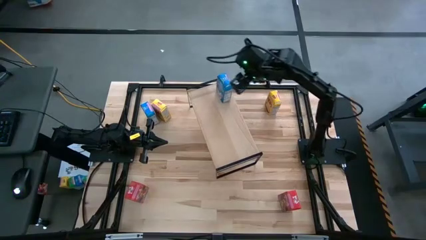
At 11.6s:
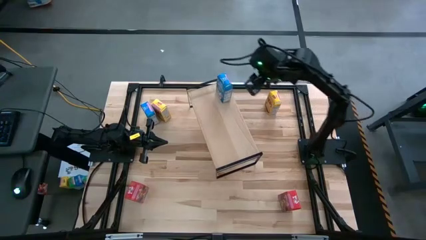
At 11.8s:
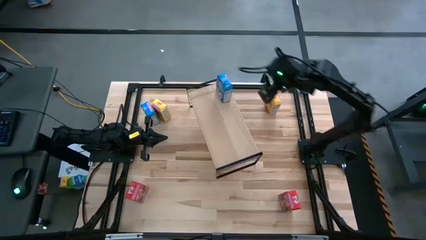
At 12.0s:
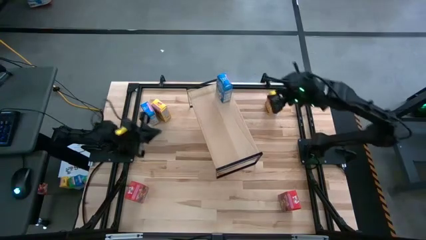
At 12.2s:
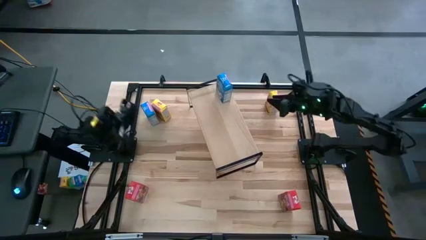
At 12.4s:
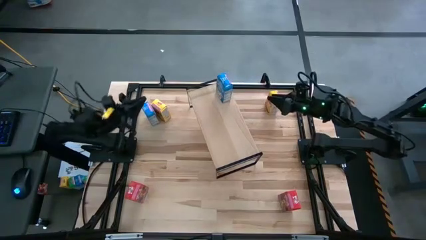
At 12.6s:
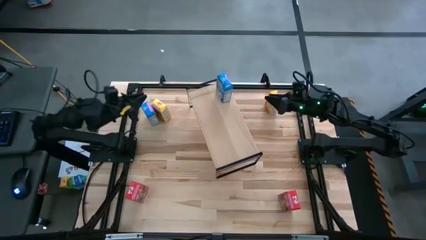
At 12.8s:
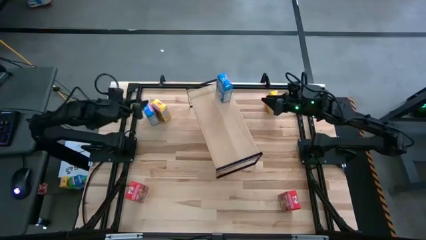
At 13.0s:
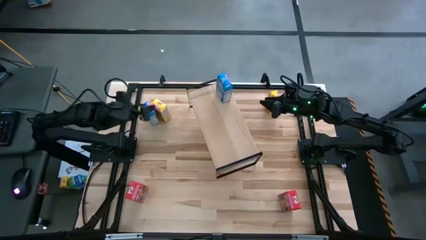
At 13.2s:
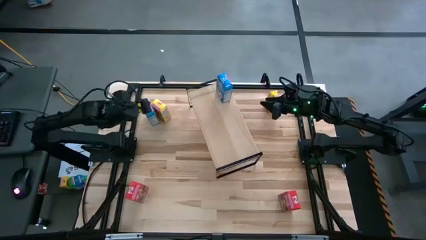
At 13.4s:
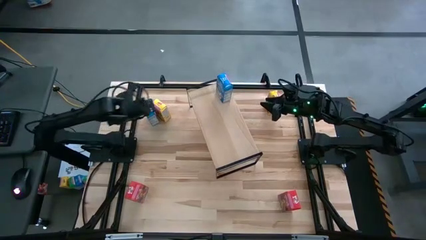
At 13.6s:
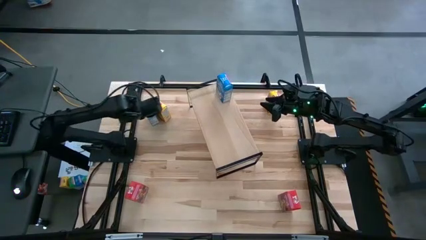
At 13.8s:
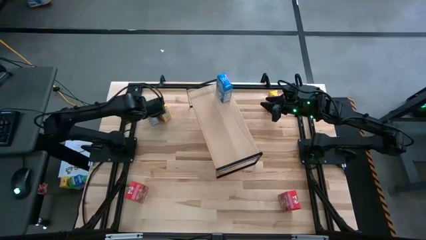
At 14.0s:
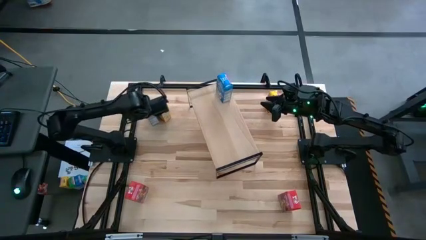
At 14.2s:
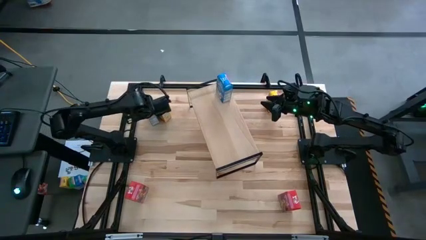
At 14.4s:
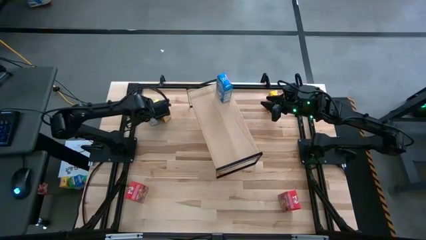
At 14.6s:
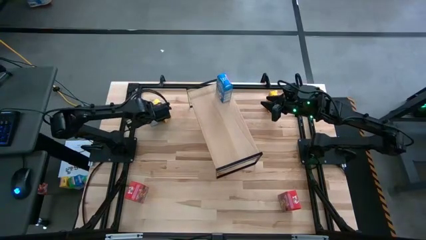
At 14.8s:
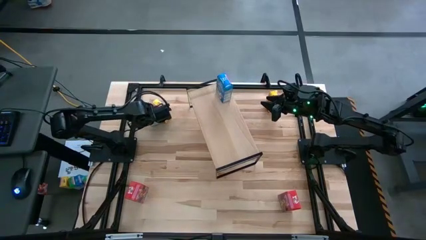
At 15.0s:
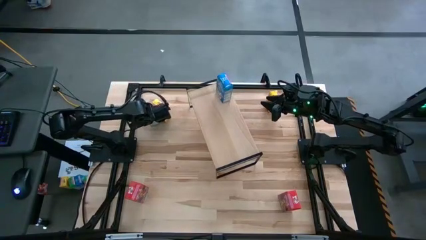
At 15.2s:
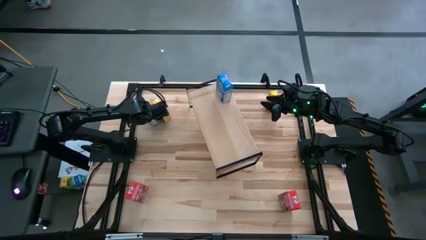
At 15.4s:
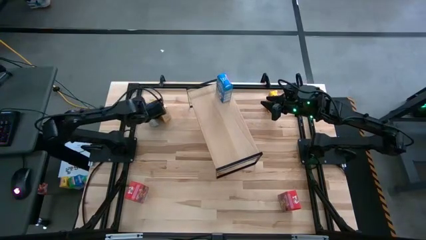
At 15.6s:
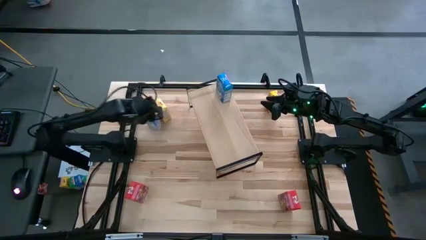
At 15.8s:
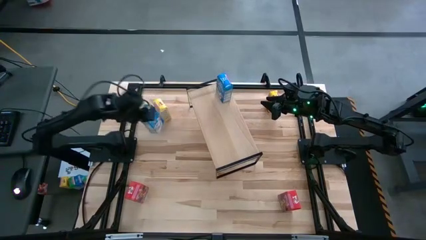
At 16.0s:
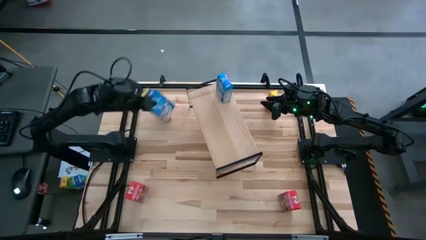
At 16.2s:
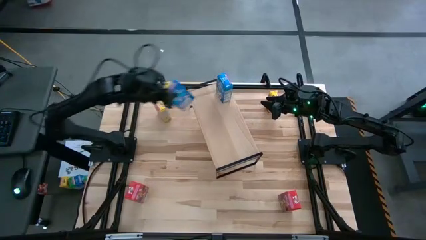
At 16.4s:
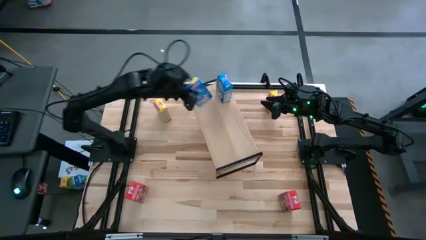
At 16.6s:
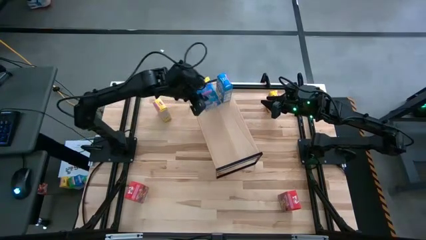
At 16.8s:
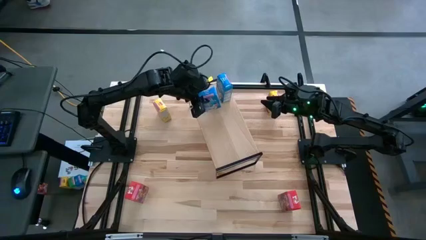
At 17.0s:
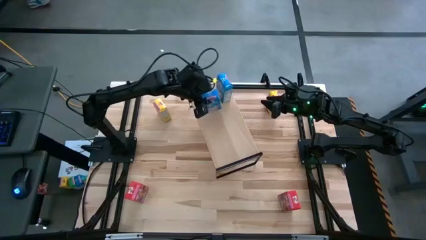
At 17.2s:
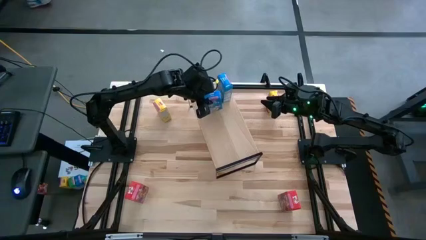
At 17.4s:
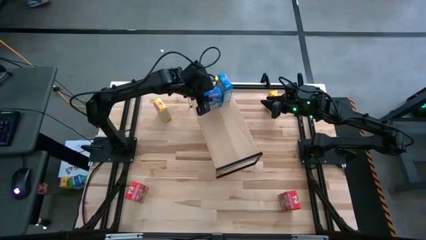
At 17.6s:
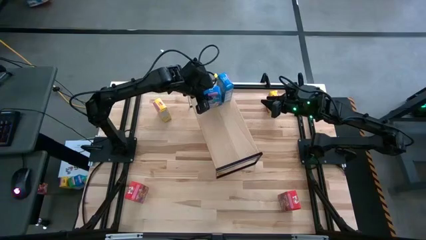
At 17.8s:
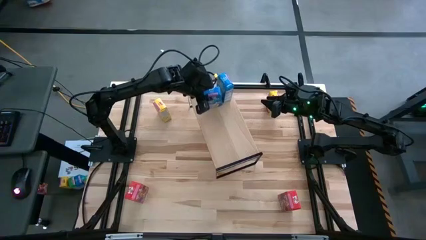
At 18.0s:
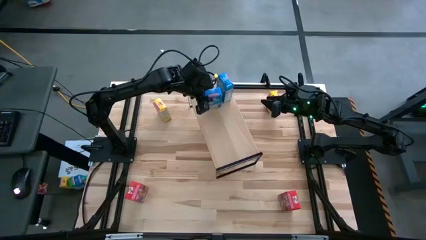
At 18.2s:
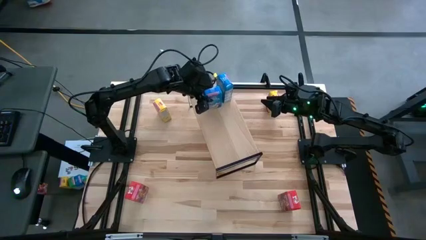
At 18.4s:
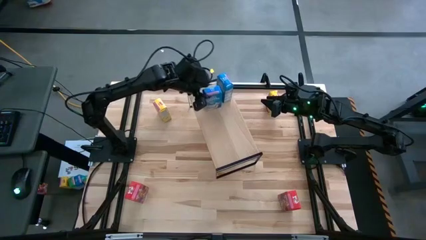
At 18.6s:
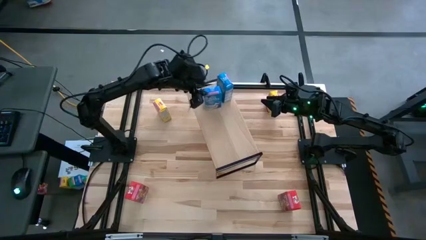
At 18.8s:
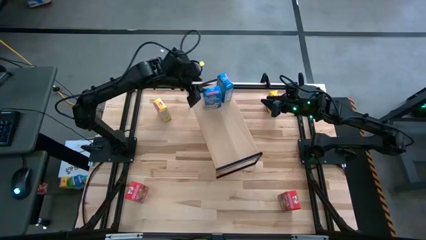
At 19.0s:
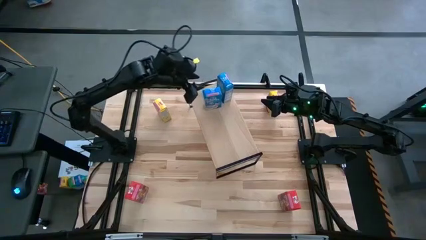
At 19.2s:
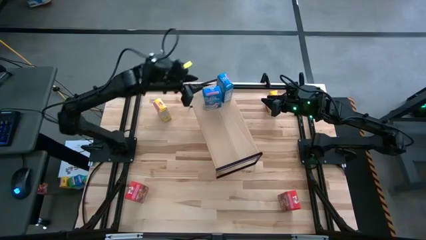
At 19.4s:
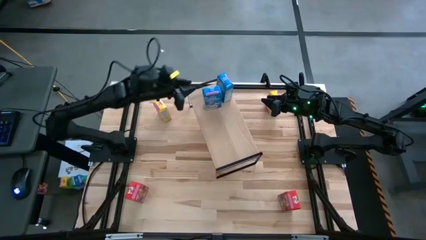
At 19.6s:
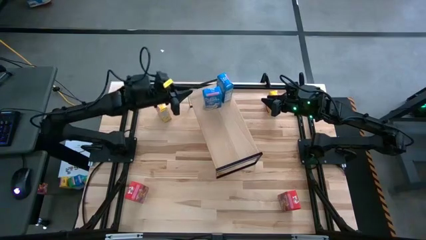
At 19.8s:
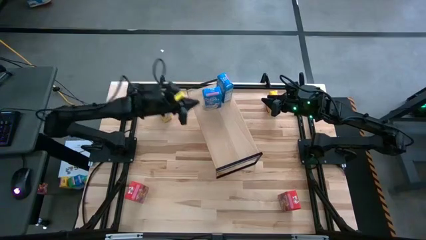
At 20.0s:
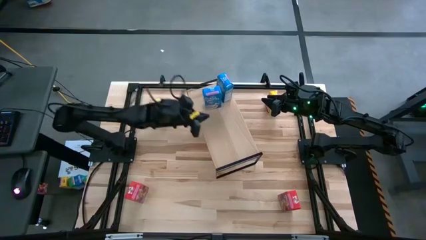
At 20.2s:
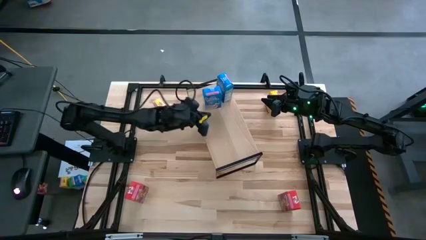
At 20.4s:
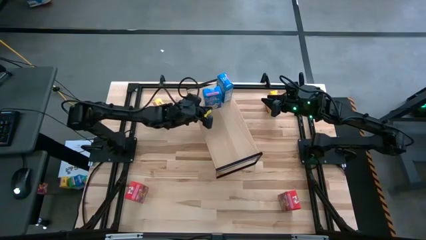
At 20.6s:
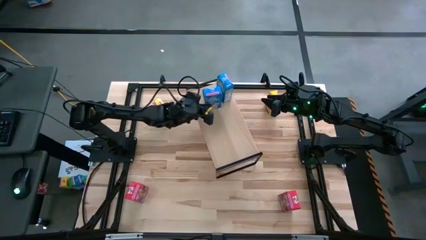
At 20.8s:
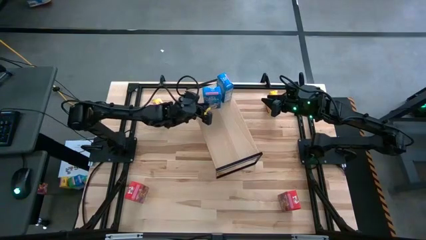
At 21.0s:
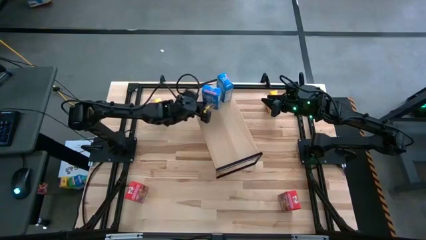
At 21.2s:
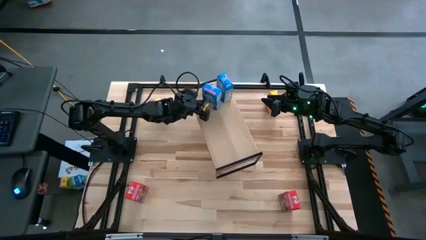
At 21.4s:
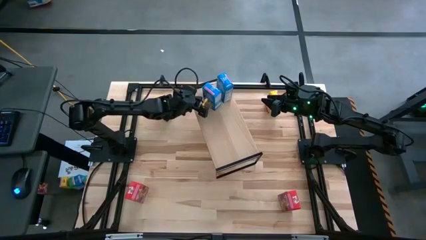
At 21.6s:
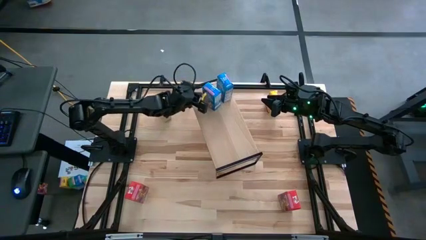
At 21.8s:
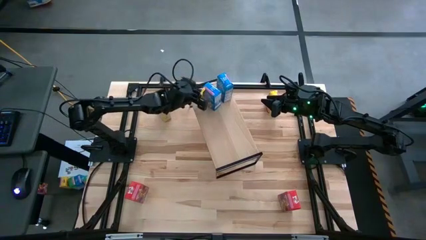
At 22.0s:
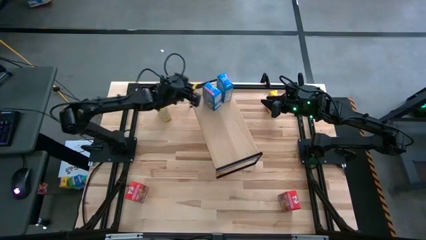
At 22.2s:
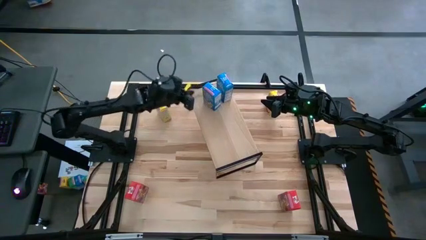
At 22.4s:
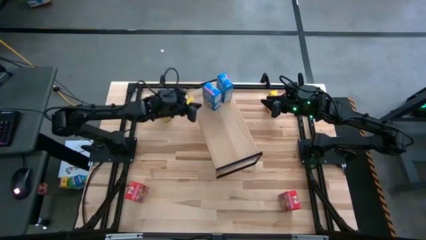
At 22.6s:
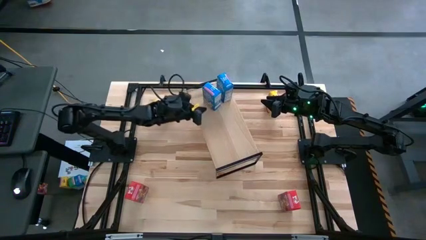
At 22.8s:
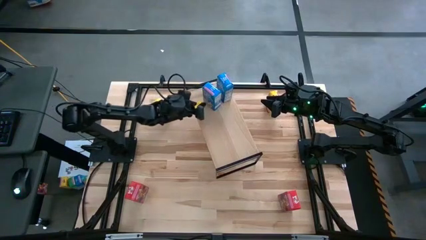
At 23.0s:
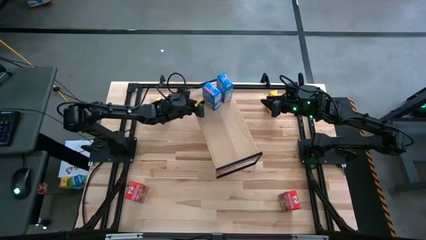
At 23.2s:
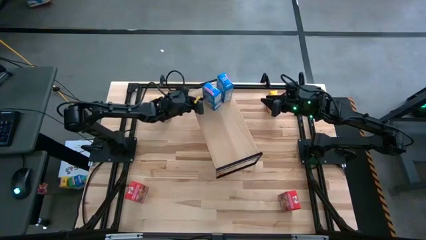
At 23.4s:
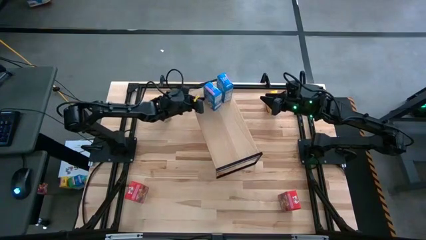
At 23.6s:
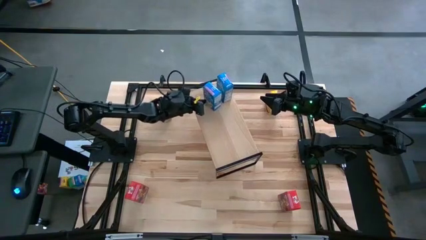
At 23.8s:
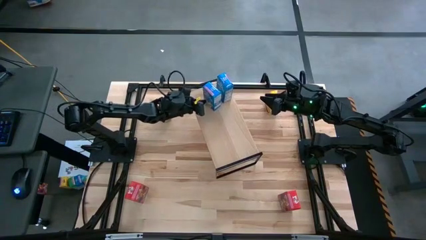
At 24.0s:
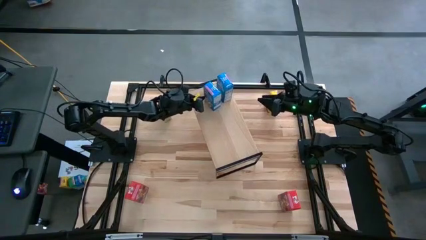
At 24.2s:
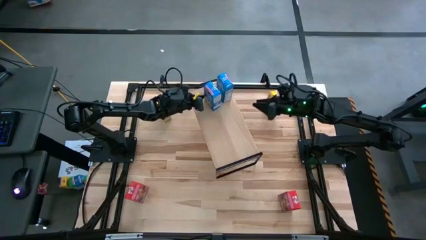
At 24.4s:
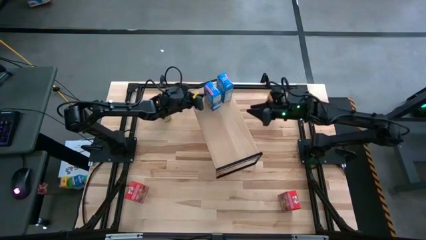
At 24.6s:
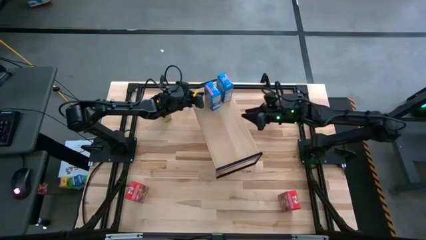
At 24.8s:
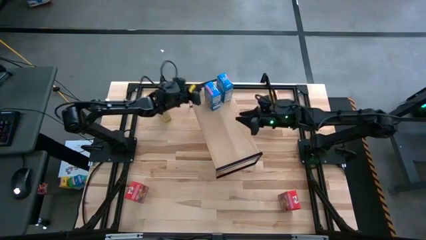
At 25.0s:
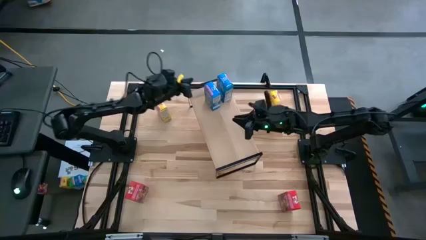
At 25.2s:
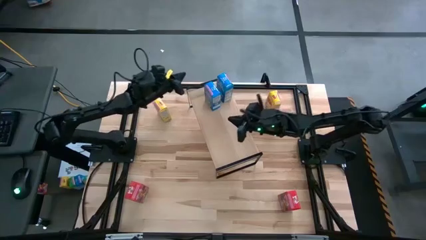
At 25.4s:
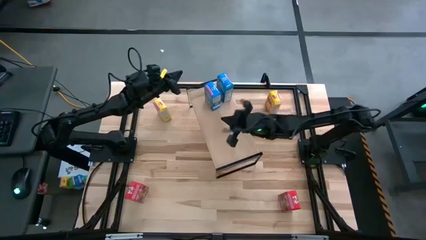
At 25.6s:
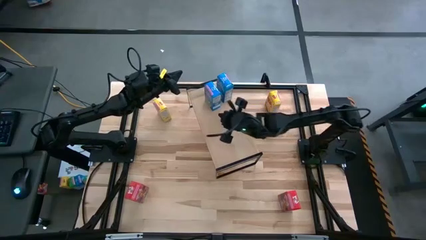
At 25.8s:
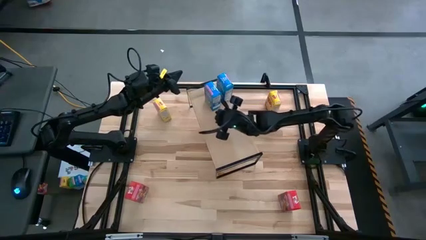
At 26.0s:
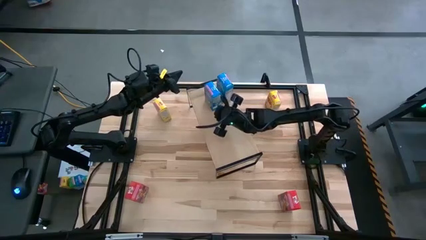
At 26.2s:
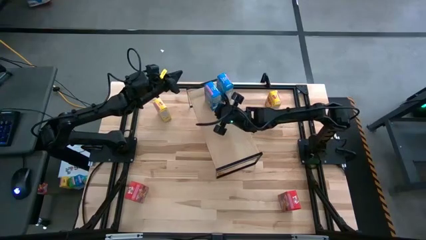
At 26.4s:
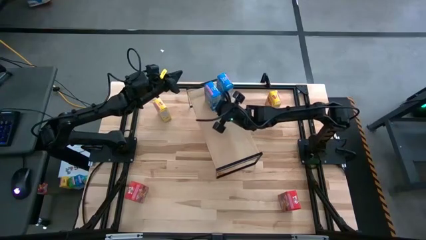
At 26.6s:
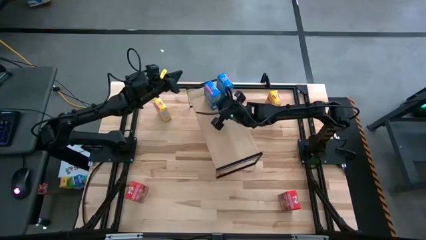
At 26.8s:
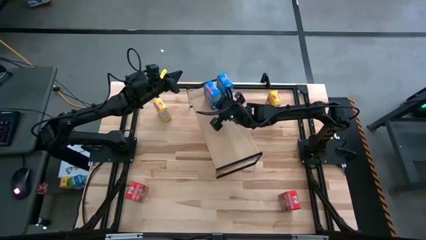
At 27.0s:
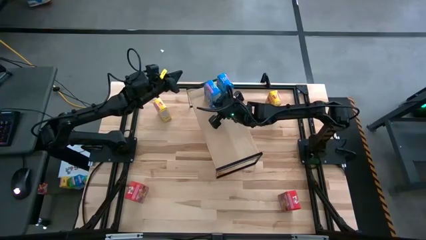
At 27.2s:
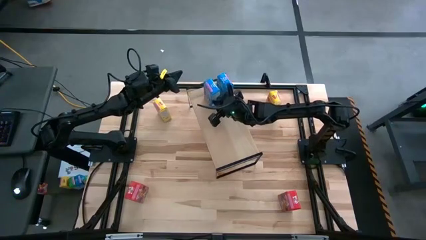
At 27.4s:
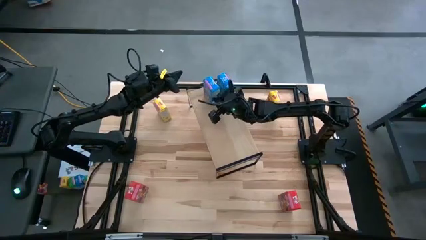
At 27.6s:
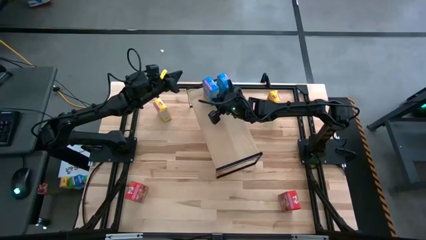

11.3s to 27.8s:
Task: Stack cereal on shelf
Put the blue cereal box on the shelf aligned with the other blue cereal box
